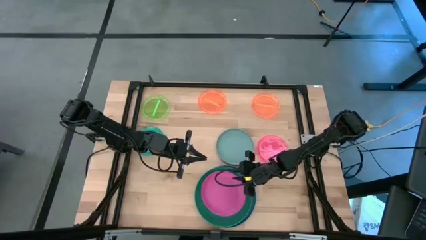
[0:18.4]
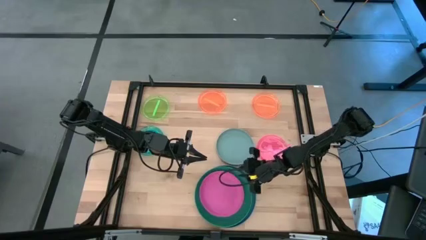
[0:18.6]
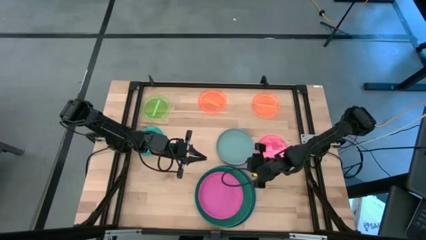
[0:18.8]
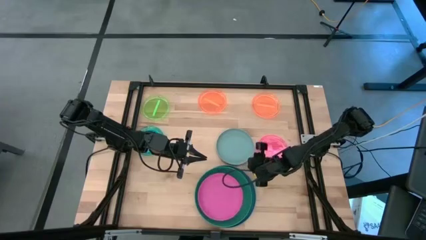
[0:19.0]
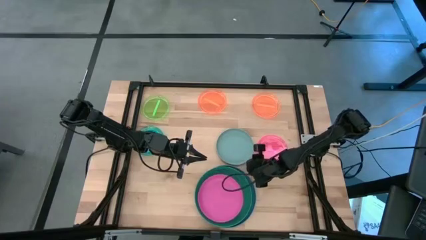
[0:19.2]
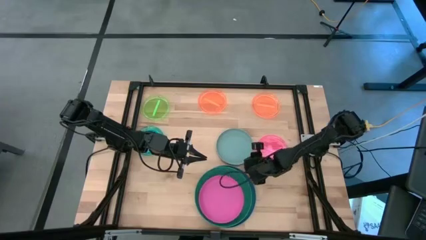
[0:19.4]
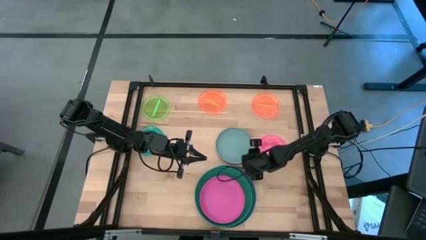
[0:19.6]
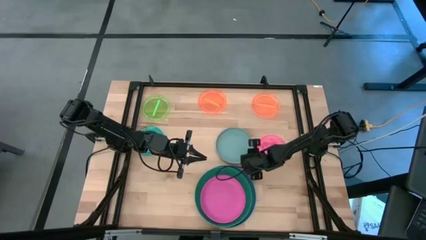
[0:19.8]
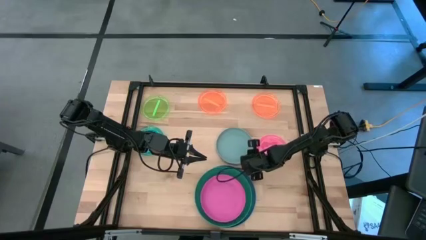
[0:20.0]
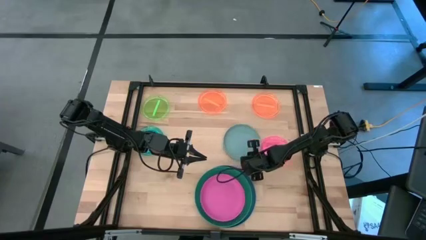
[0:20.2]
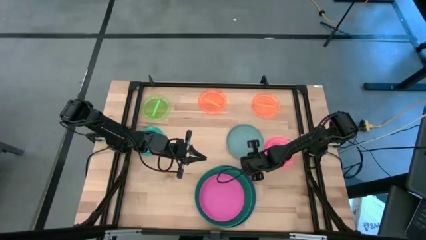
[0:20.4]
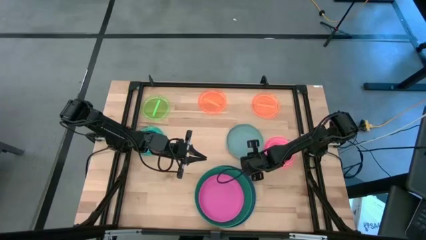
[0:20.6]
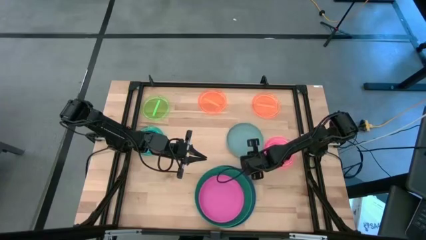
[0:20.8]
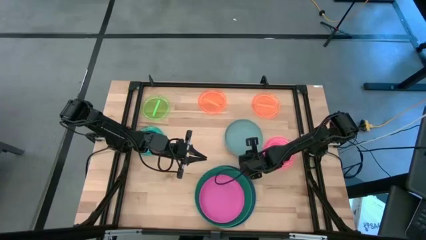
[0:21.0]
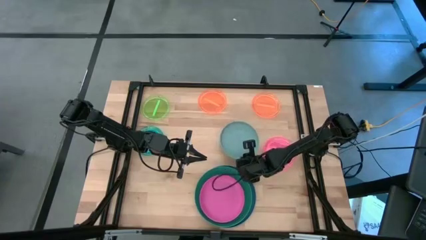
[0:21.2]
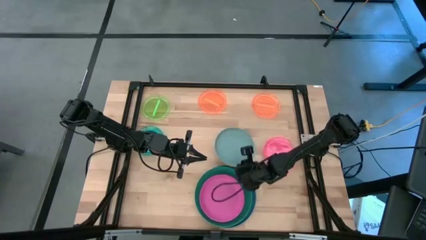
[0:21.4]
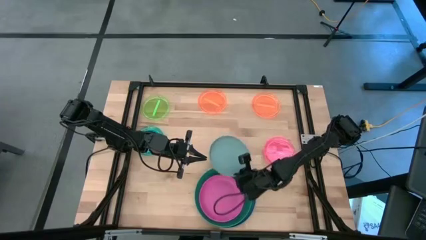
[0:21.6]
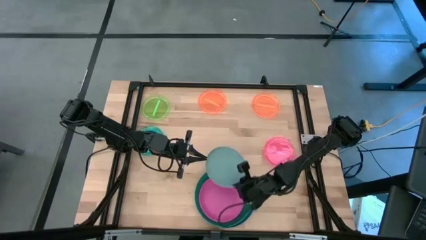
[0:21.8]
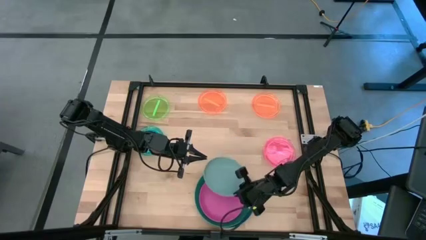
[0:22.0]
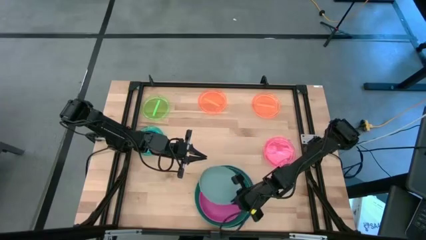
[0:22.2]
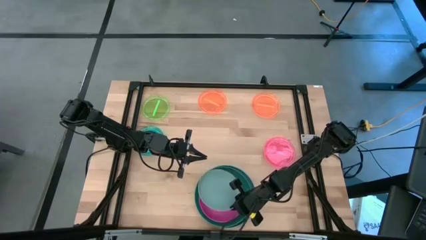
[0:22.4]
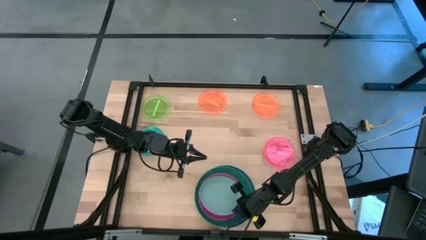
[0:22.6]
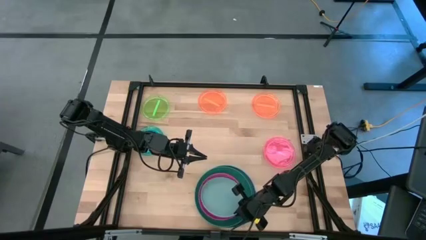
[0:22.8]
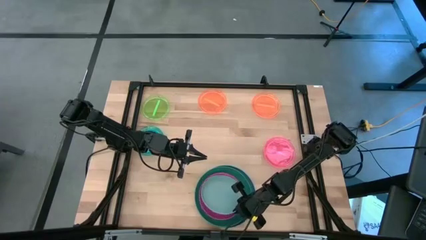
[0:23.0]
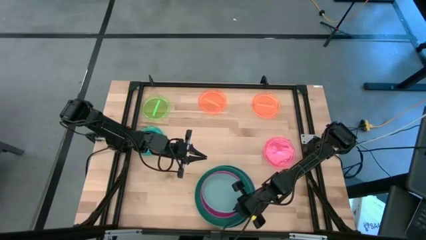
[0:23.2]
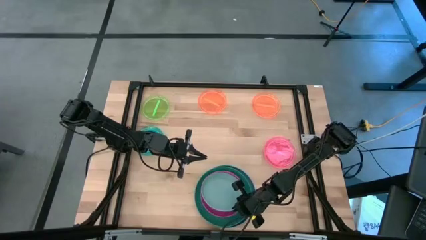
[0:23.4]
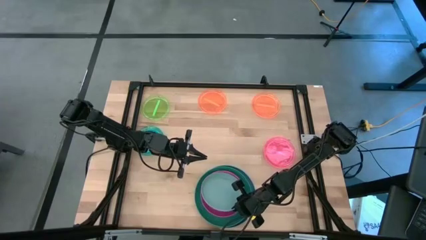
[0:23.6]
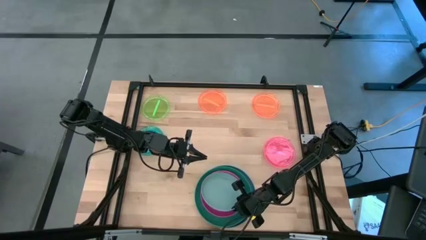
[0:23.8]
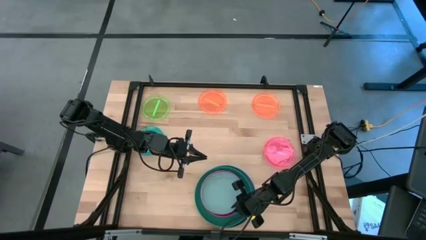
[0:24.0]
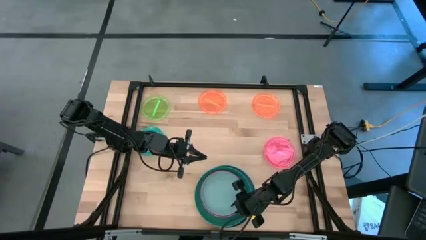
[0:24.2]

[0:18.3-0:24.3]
Task: Stack plastic plates
Stack the gray plate on top of the pink plate

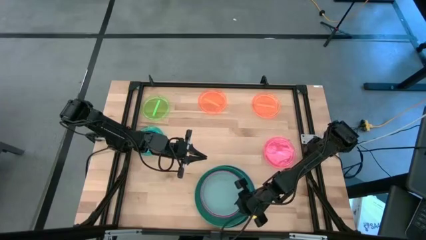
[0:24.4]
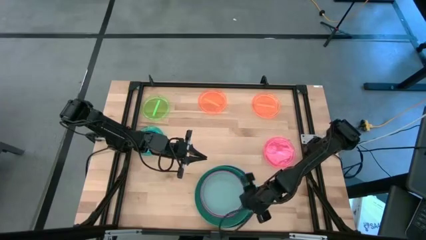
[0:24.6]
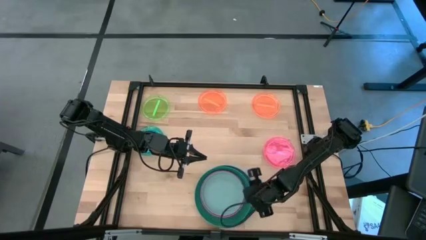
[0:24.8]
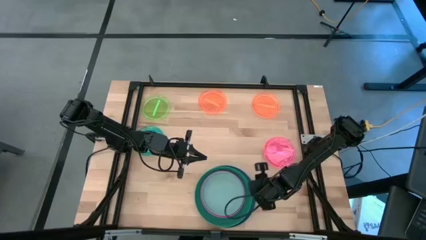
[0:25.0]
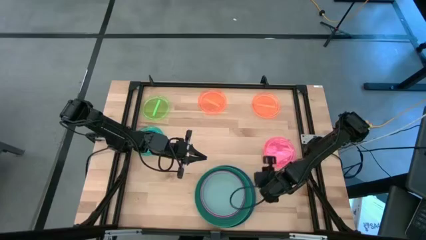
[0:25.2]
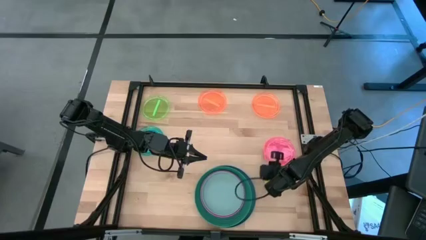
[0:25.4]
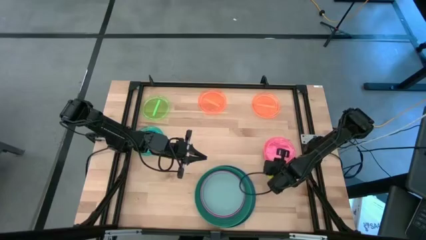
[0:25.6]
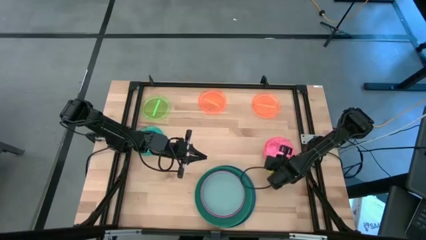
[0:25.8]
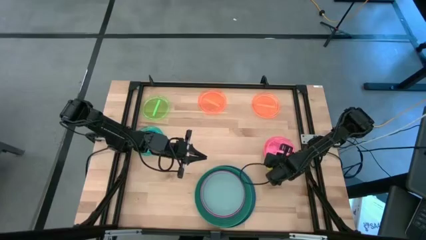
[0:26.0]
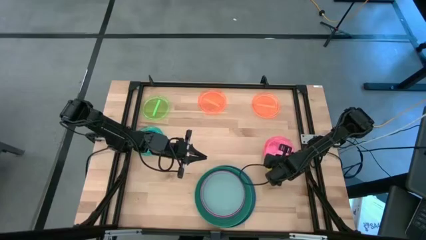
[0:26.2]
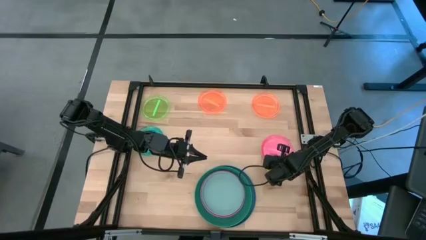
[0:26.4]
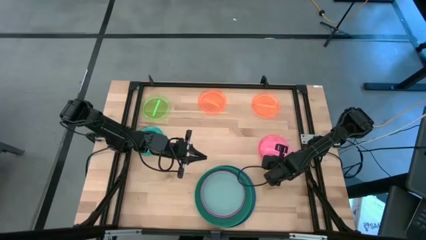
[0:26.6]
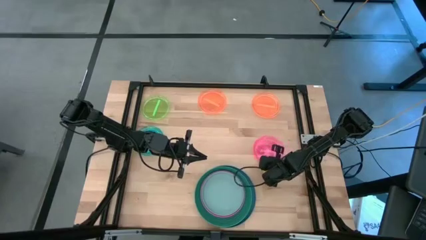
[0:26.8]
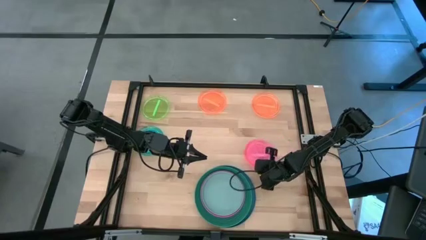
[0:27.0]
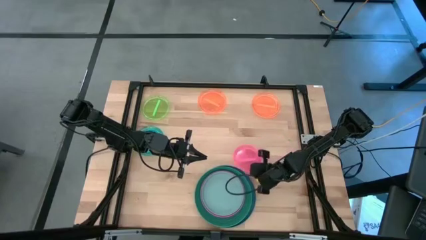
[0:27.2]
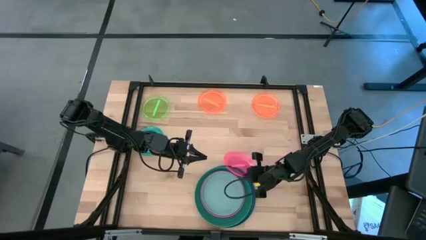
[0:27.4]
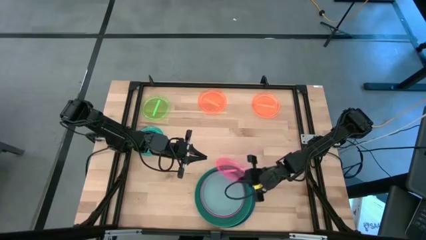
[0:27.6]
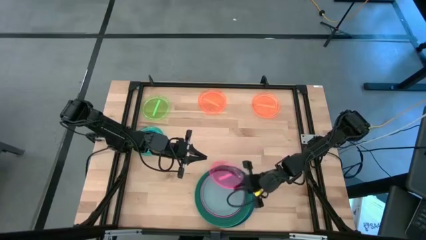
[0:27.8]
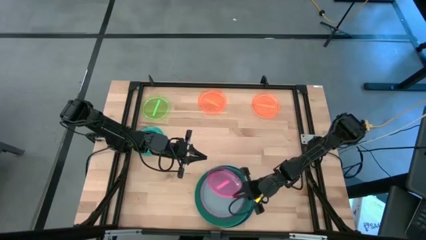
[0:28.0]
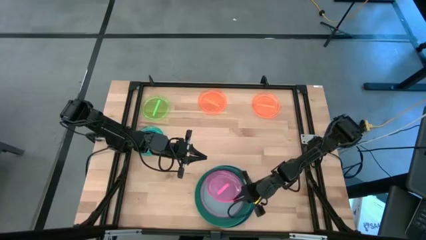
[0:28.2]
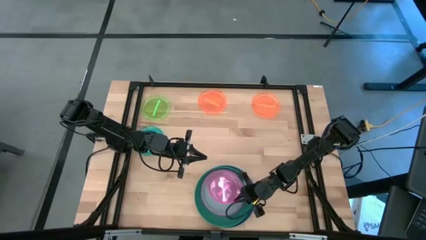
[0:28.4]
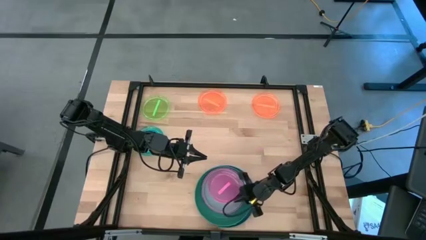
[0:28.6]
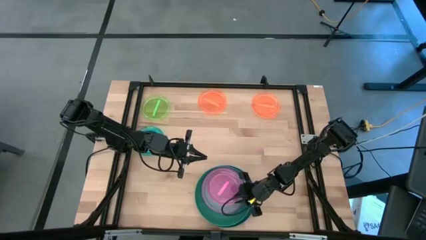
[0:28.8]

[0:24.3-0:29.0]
Stack the light pink plate on top of the gray plate

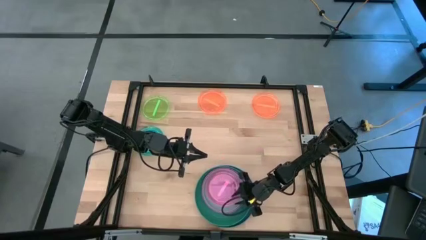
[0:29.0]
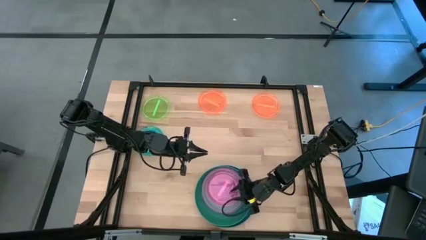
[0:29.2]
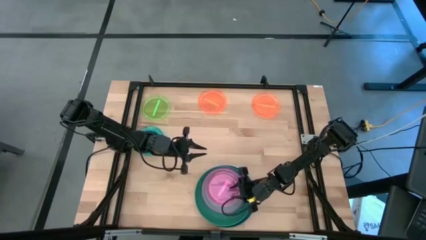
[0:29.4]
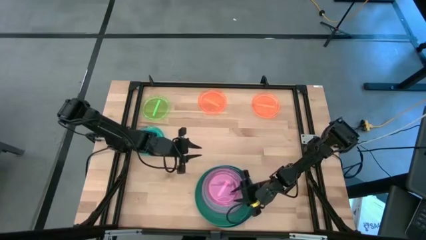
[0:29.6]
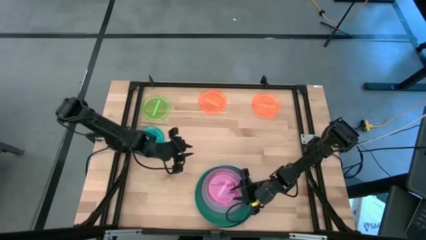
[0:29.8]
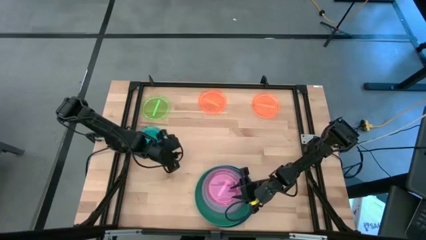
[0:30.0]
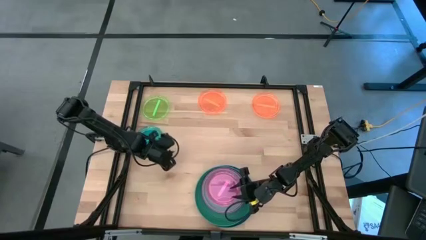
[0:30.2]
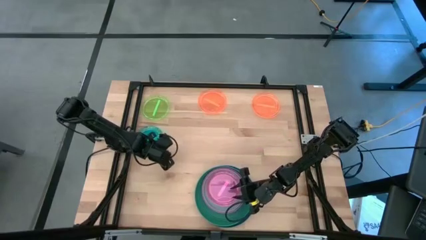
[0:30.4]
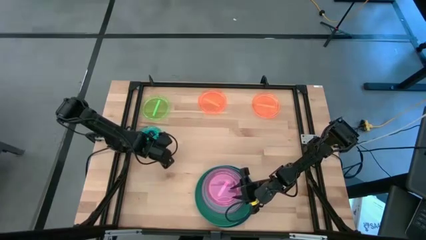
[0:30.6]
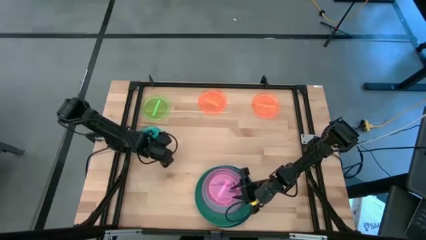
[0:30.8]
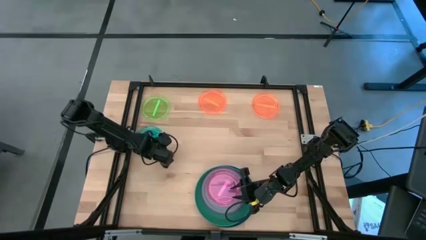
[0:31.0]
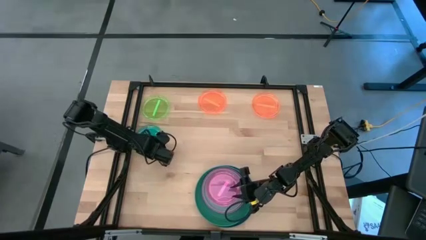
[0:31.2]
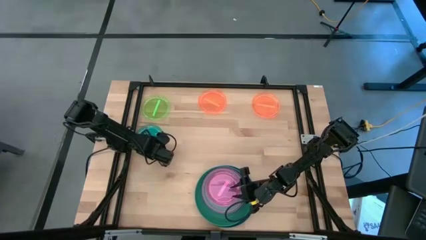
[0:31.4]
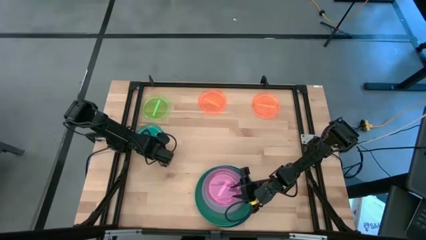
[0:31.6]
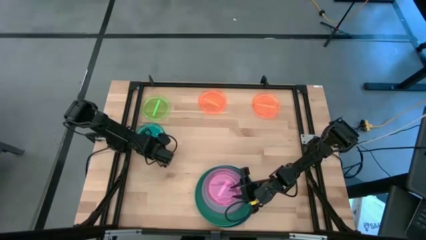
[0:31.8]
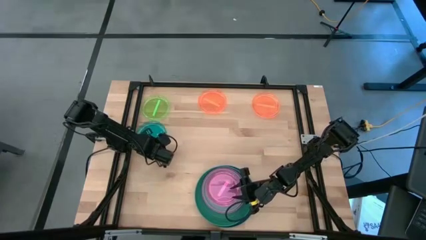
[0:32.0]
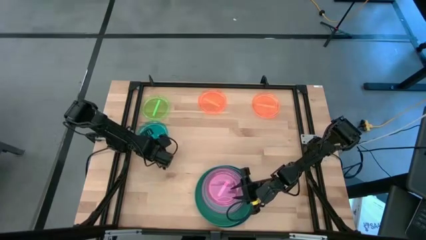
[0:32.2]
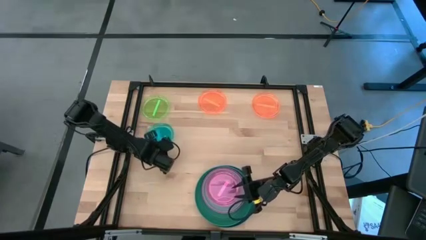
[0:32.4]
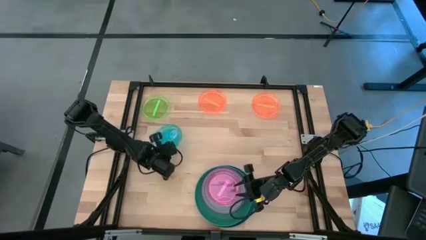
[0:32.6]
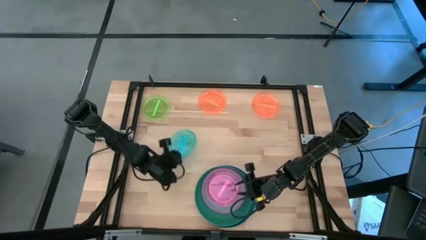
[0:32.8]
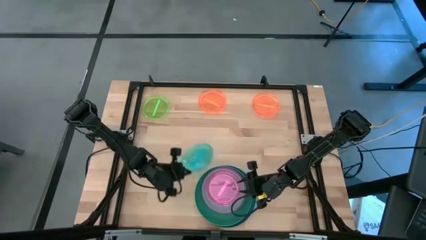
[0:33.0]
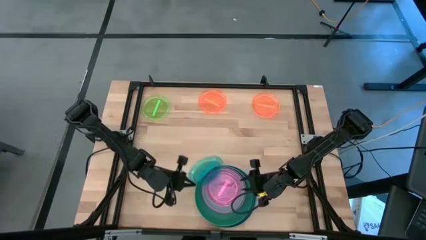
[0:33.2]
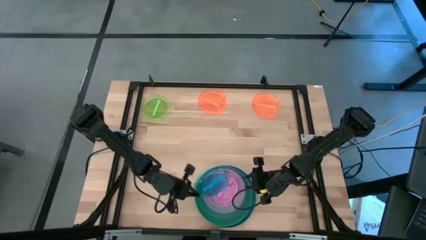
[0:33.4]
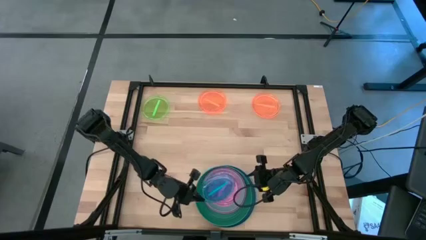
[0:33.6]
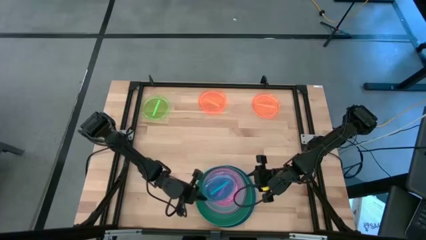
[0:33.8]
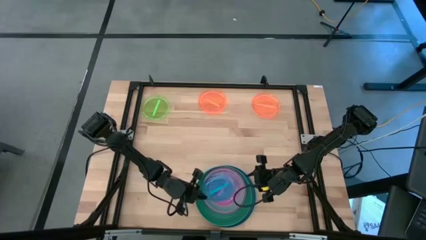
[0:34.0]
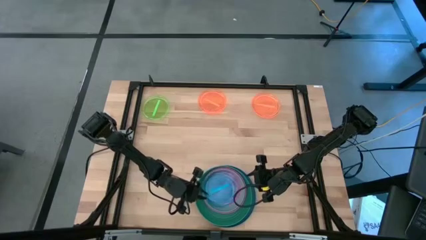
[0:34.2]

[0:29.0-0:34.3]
Stack the light blue plate on top of the light pink plate
